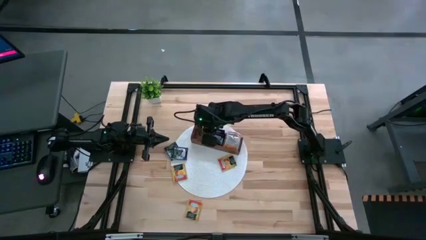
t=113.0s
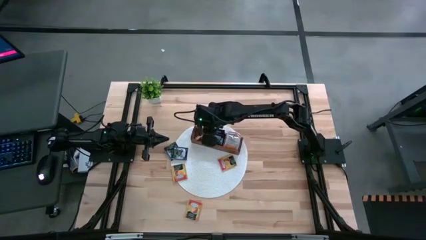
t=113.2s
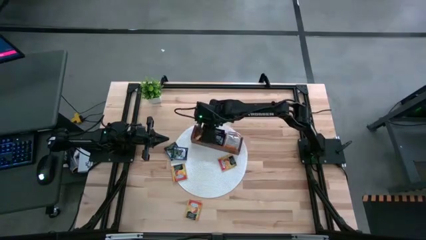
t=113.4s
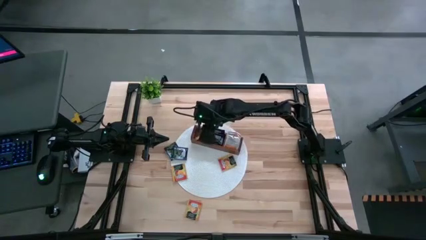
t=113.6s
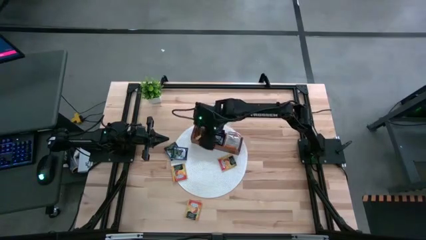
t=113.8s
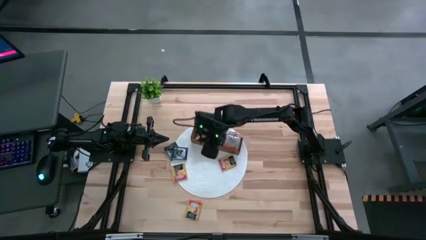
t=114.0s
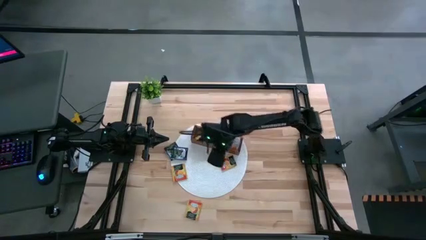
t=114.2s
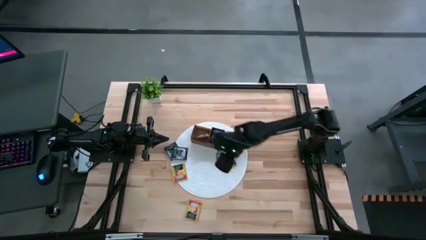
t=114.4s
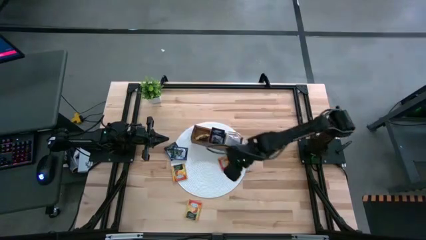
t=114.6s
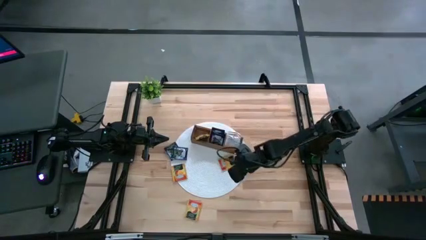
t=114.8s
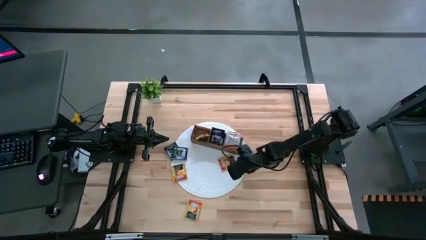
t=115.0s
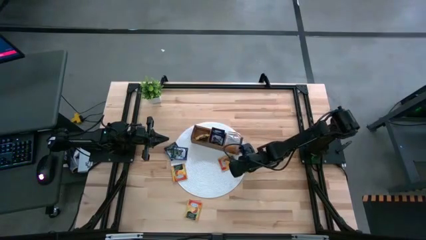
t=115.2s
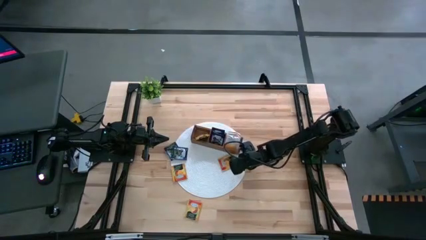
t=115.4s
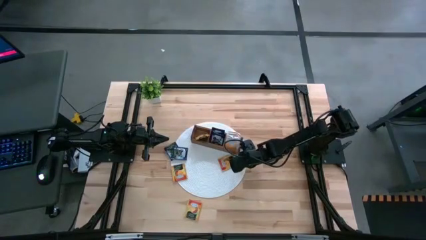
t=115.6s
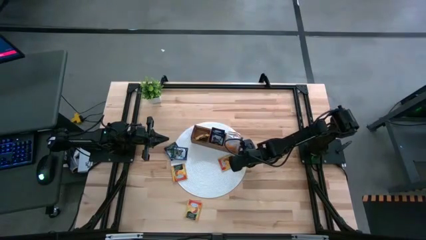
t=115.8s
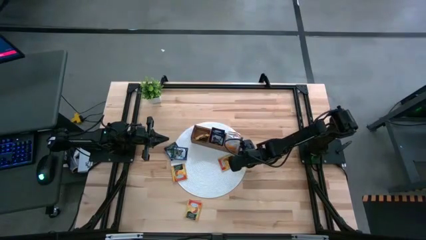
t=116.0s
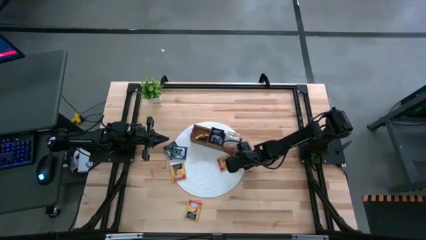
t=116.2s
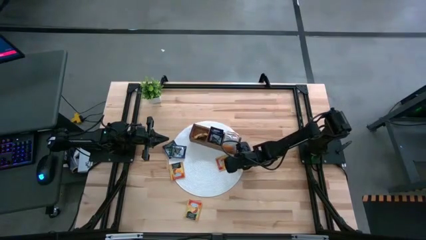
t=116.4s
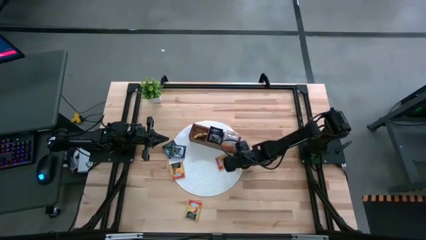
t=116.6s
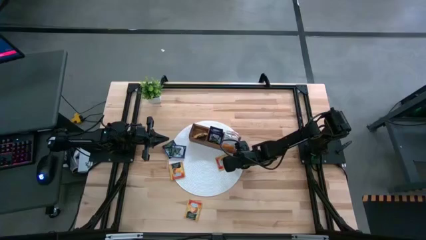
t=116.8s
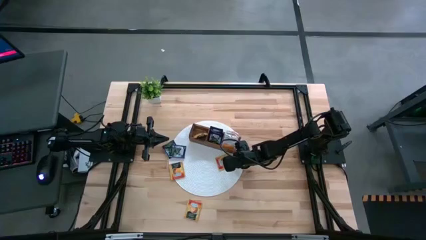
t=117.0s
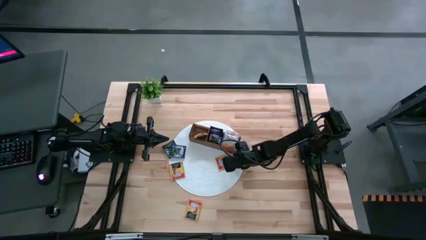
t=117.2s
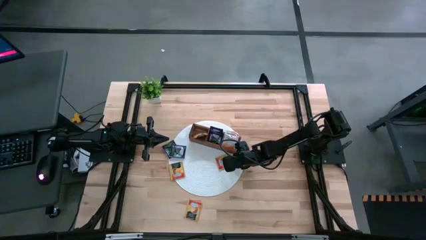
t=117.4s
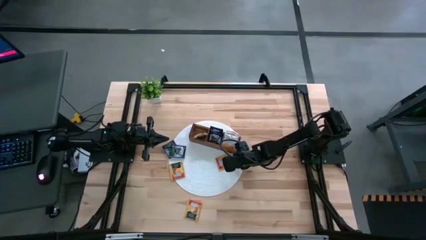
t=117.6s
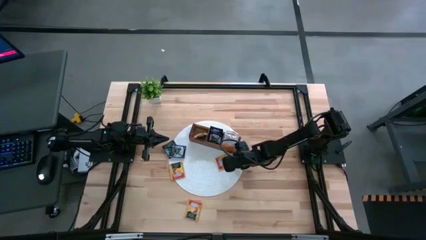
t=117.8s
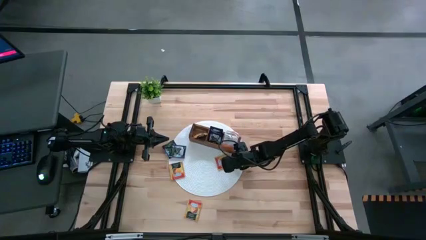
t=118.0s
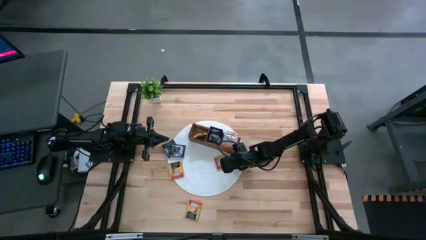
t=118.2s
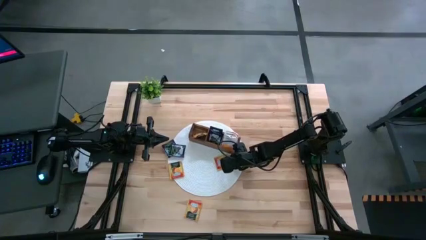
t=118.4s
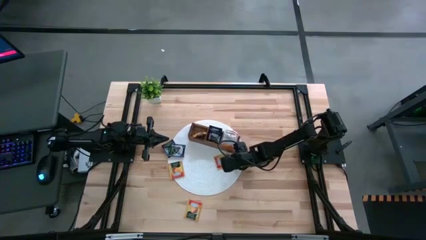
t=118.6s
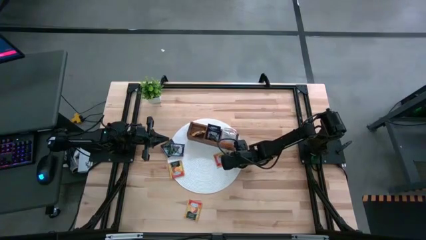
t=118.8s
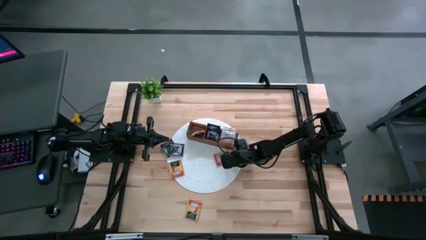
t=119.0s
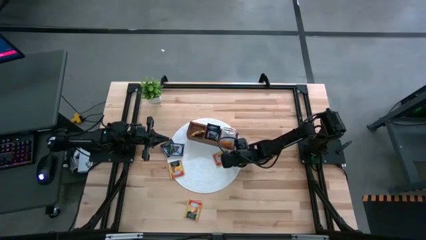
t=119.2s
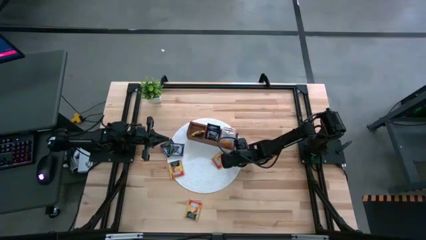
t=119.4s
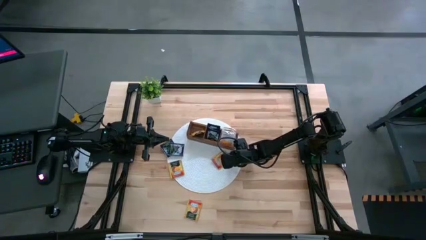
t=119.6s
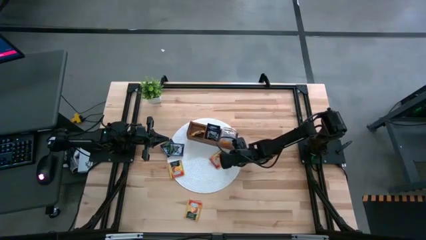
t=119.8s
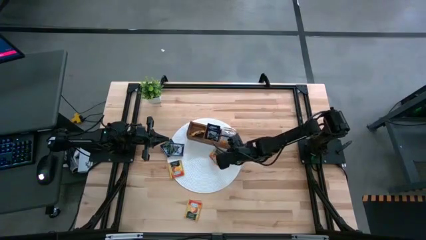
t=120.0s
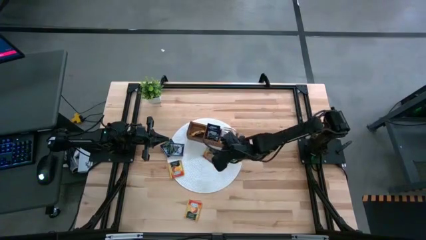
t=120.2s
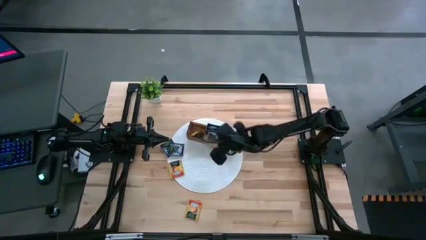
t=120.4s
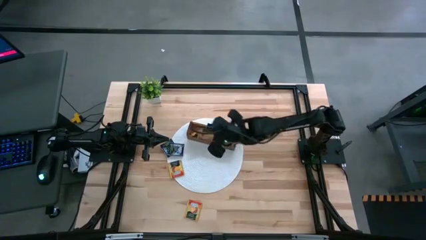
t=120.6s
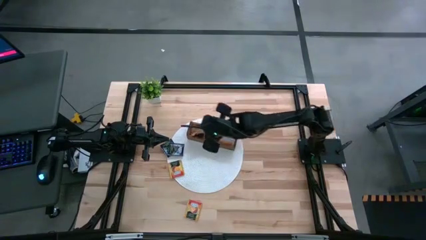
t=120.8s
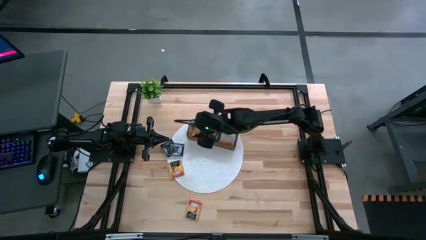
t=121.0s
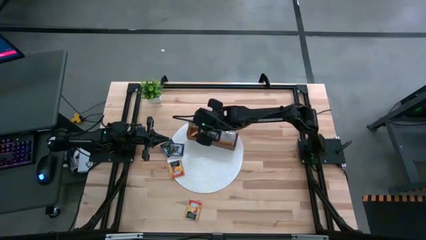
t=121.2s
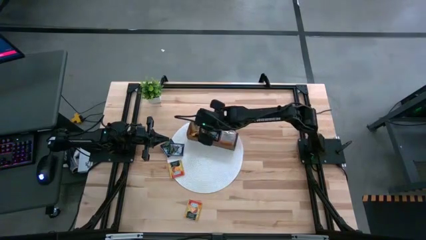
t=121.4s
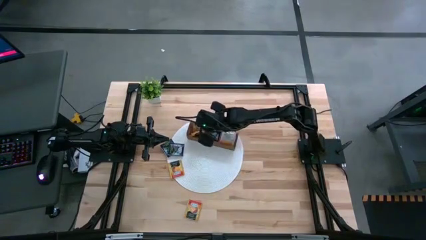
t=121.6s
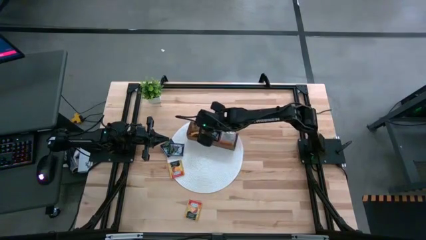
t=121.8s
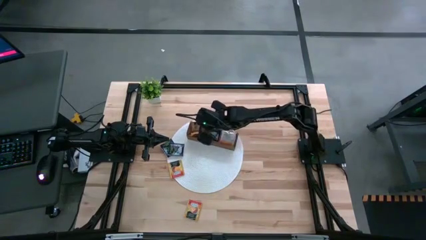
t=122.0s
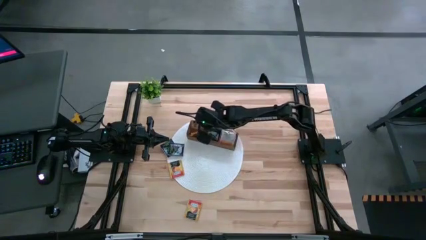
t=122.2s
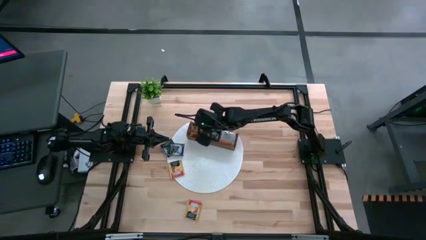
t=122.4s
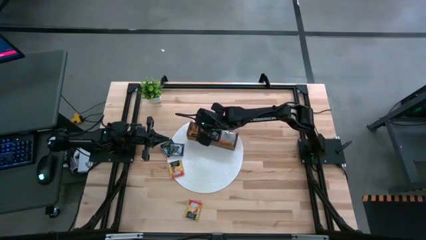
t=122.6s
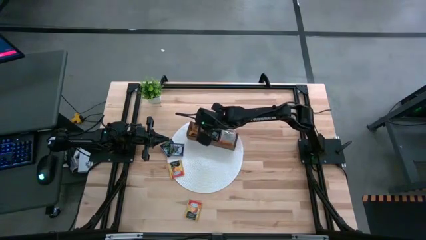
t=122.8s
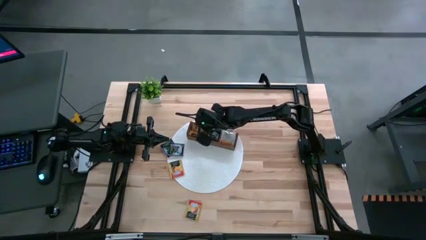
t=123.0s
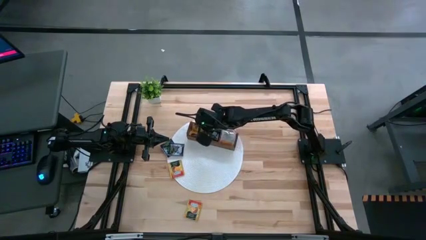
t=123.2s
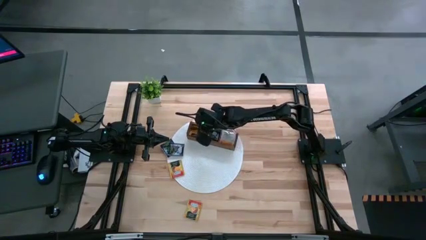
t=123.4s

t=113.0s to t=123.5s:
Task: Pick & Place Tea
Put the orange tea bag into the left section of the wooden organizer
